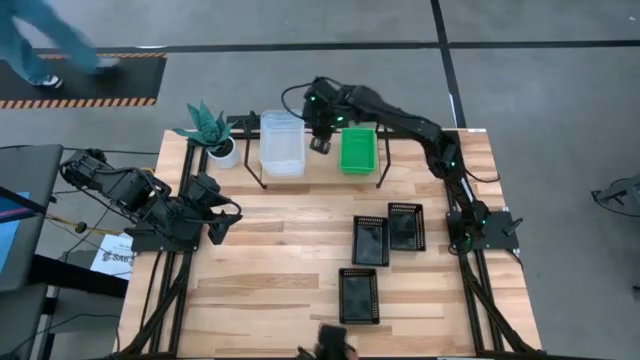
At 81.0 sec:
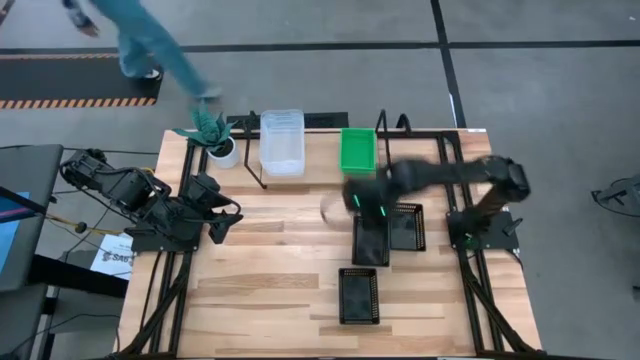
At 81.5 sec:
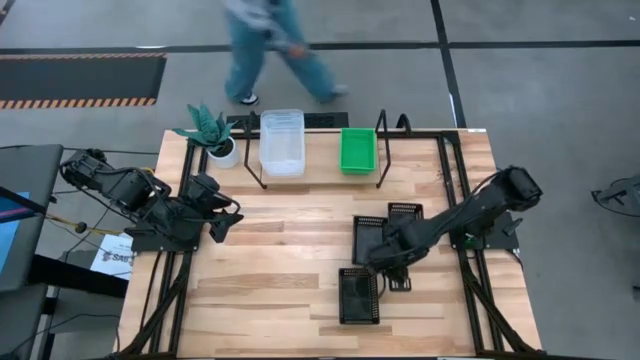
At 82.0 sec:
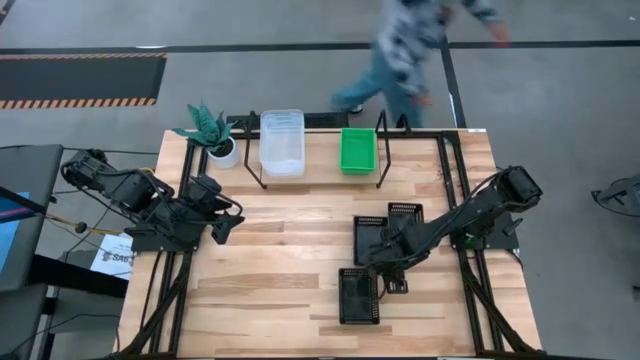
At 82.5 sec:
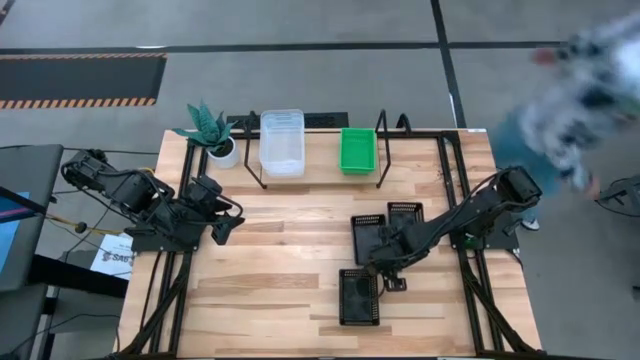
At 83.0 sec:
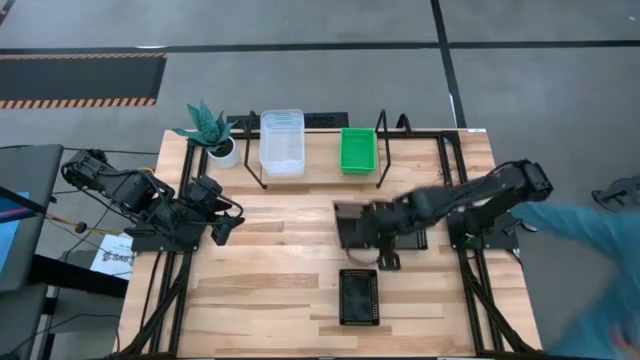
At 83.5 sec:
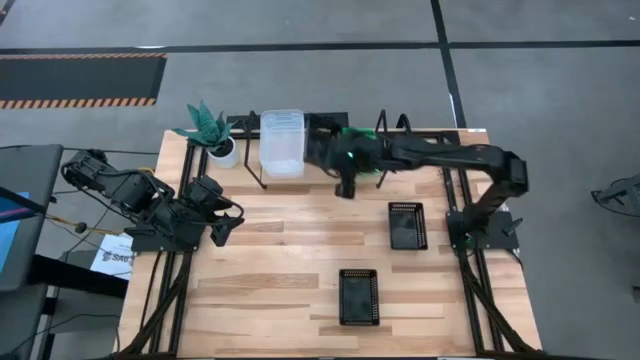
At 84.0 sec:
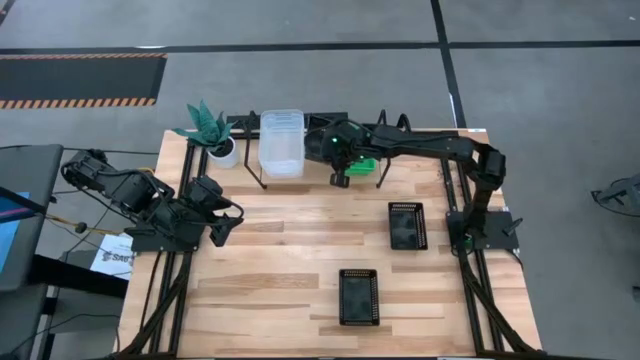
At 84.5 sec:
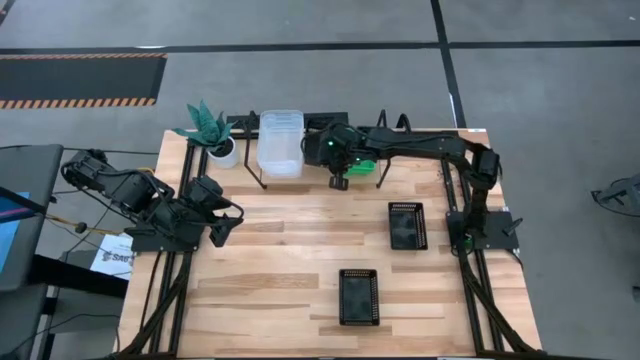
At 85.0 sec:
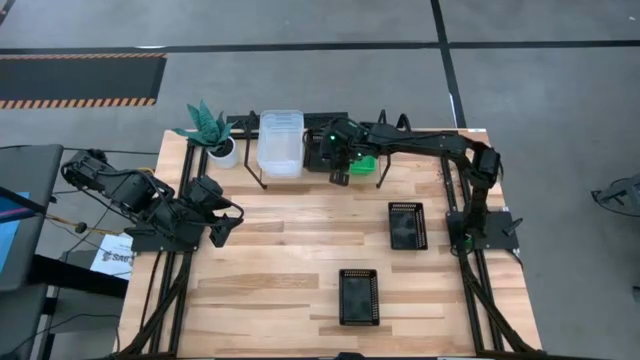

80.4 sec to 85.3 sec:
Task: Stack baskets on shelf by color
Put the top left black bin on the shelf

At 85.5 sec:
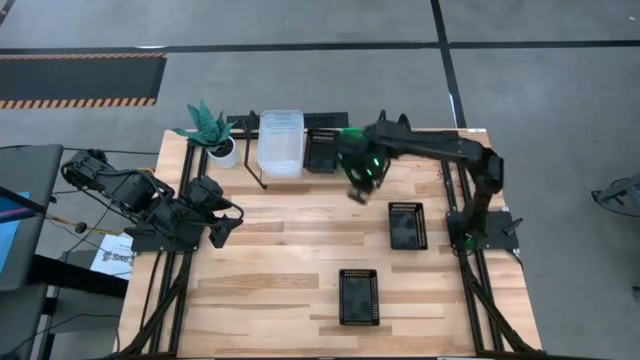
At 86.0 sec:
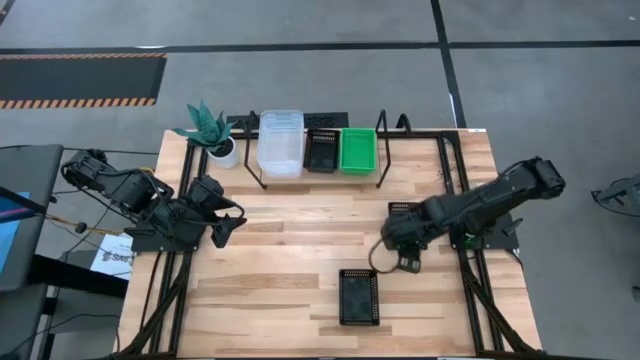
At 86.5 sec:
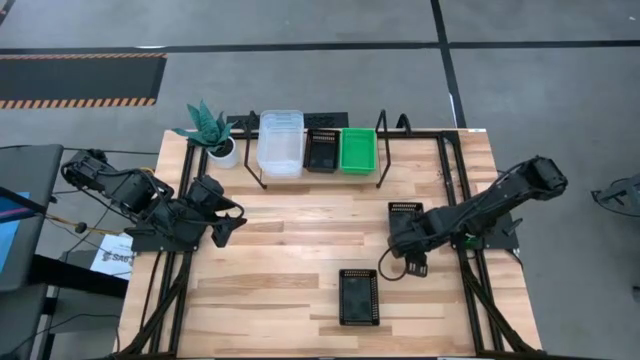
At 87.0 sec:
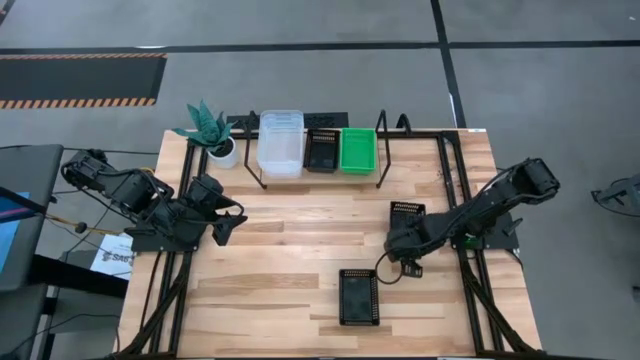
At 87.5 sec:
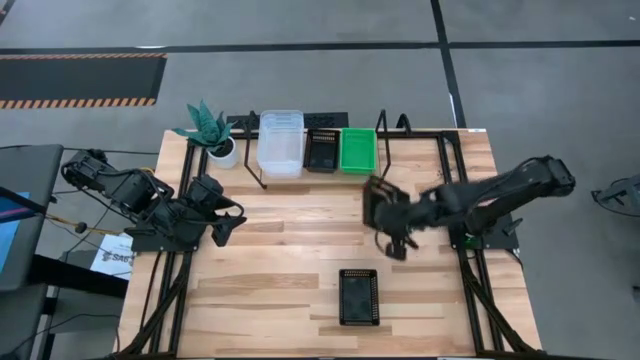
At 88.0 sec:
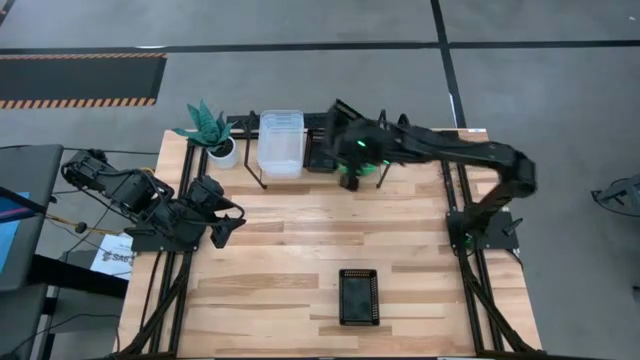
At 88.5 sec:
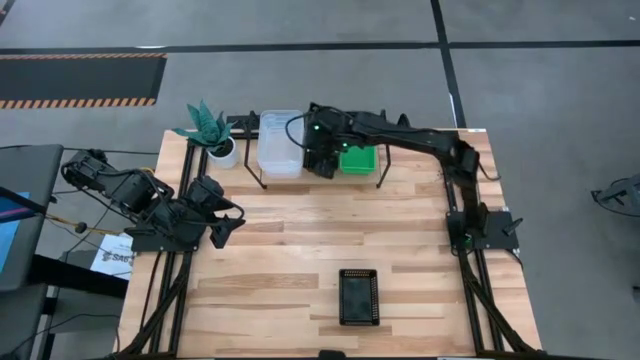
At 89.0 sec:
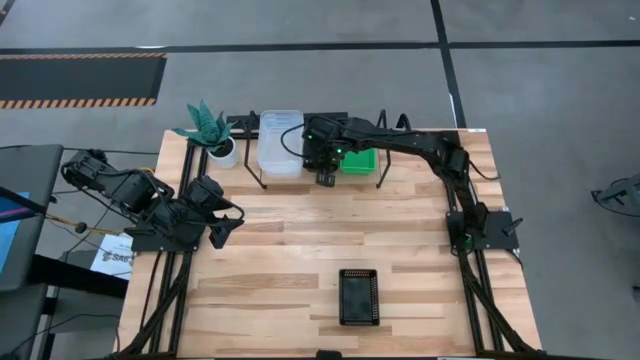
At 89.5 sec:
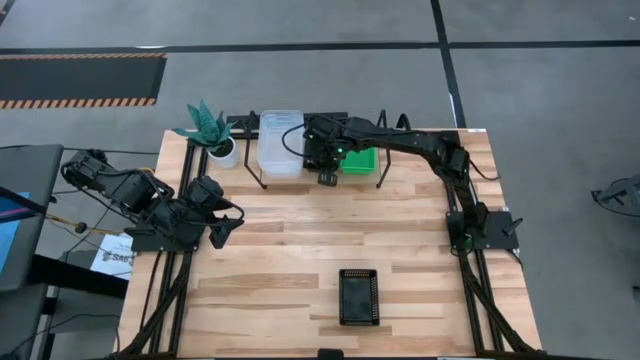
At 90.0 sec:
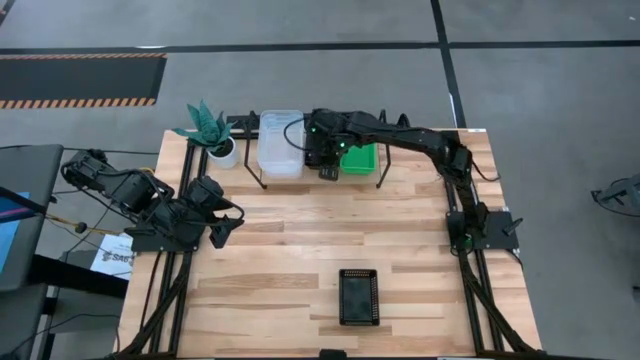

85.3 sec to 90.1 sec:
Stack the top black bin on top of the black bin on the shelf

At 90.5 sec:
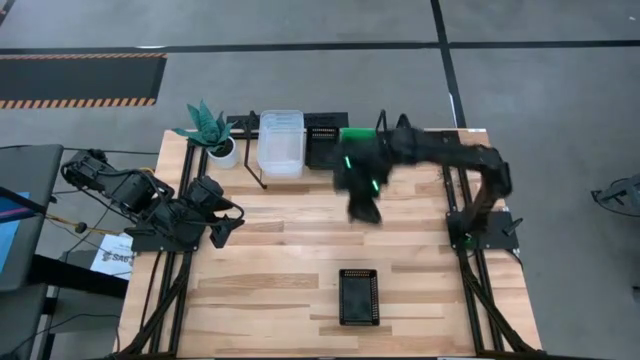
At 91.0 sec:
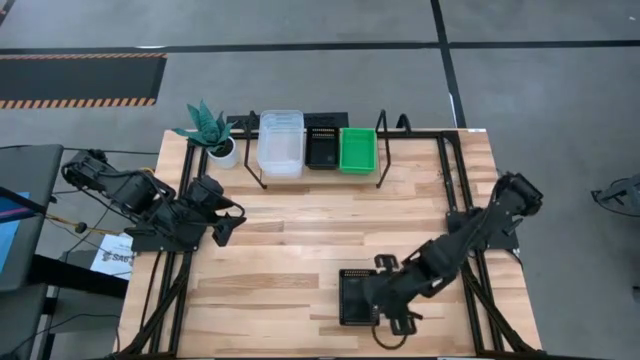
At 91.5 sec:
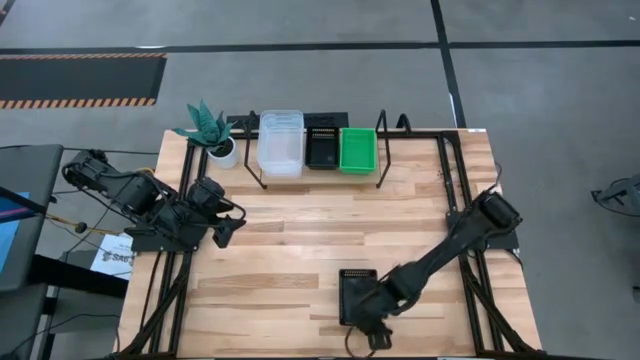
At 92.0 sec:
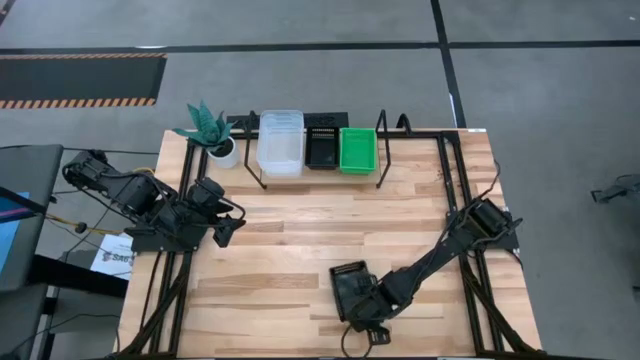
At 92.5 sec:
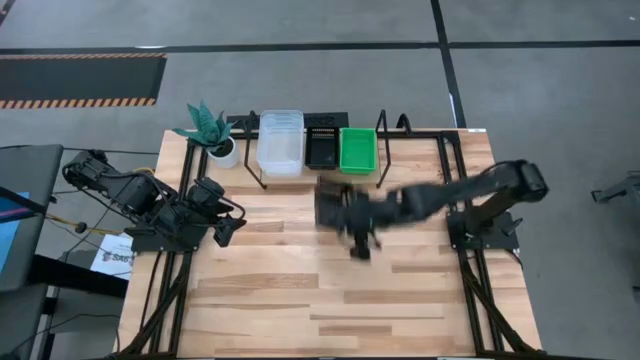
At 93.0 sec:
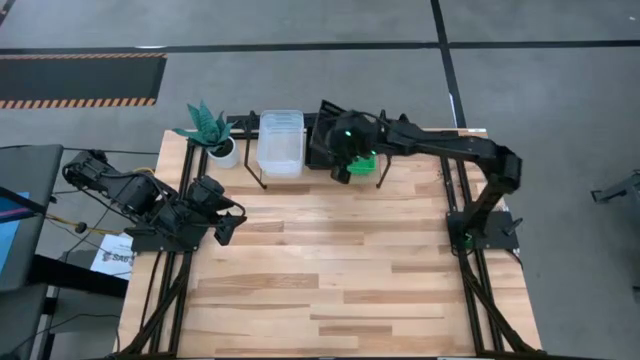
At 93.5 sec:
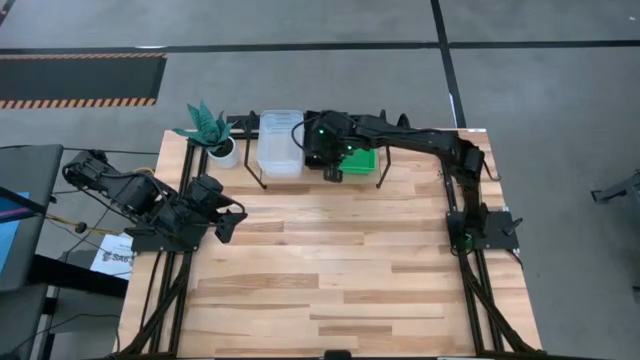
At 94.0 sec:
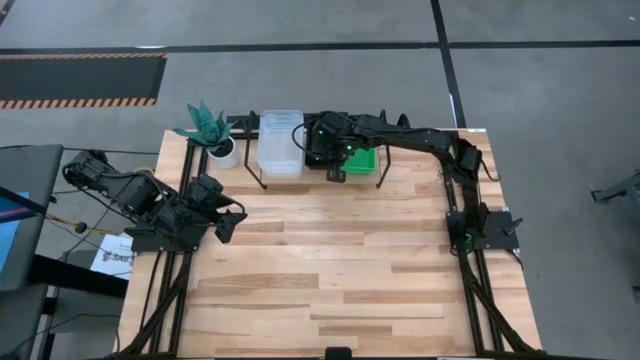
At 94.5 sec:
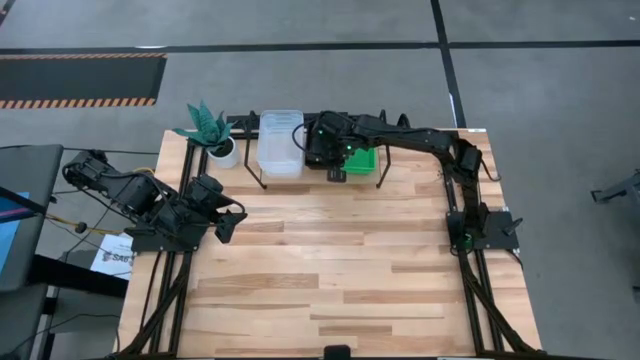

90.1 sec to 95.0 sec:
Stack the black bin on top of the stacked black bins on the shelf

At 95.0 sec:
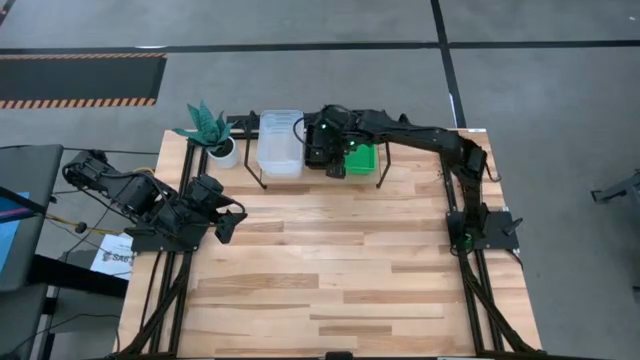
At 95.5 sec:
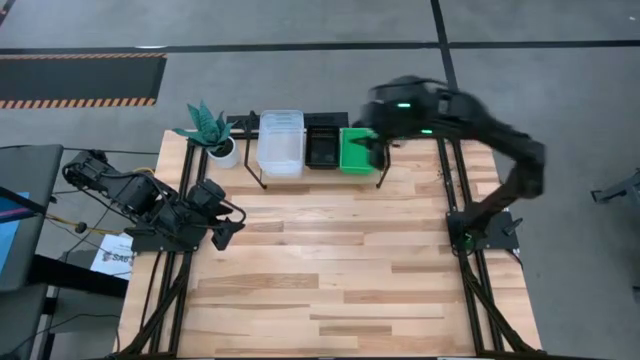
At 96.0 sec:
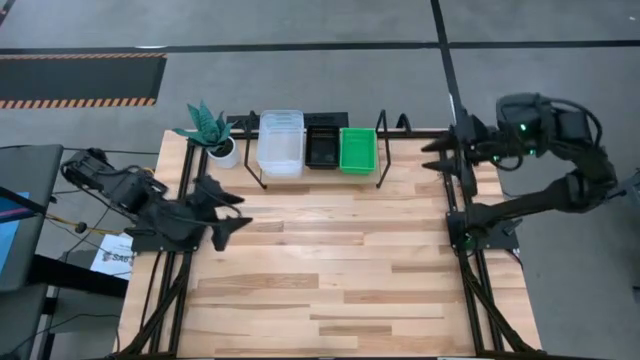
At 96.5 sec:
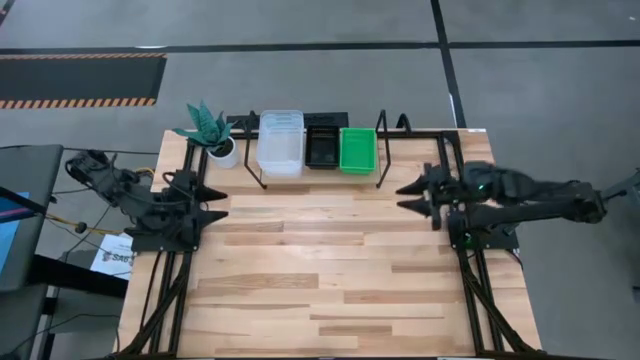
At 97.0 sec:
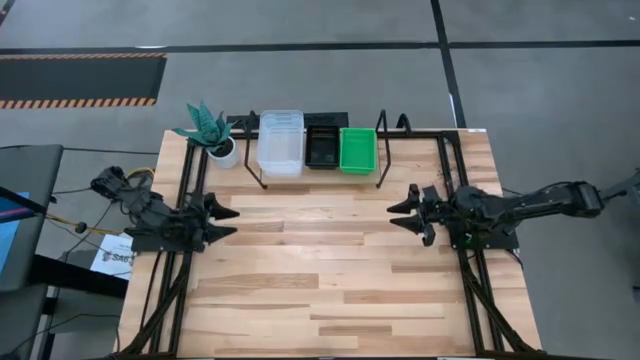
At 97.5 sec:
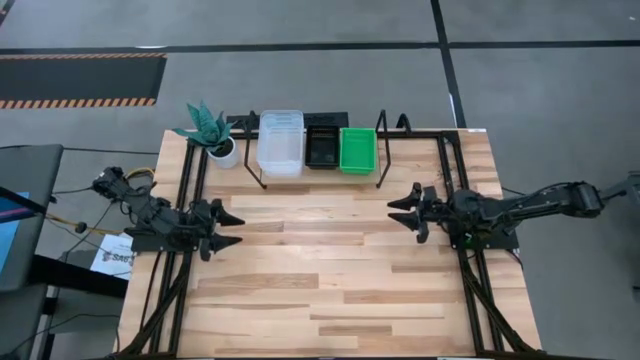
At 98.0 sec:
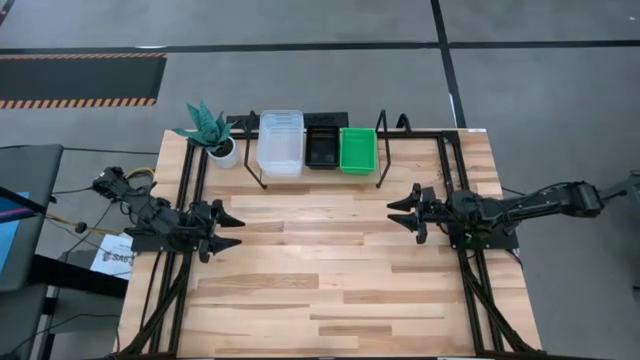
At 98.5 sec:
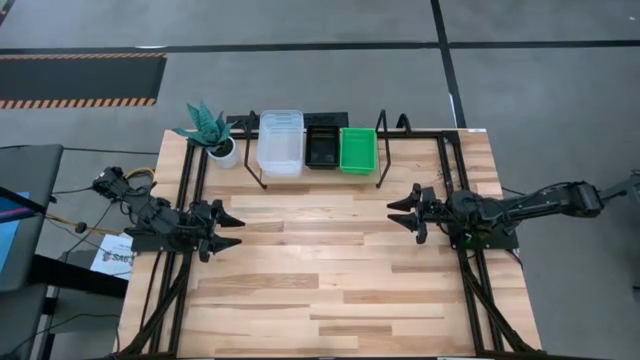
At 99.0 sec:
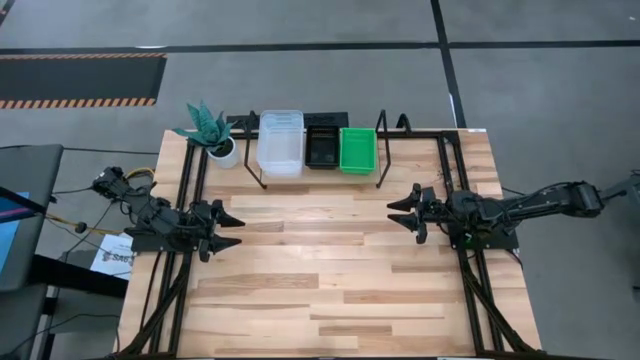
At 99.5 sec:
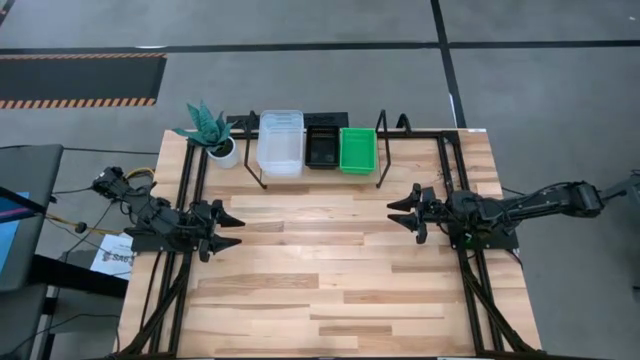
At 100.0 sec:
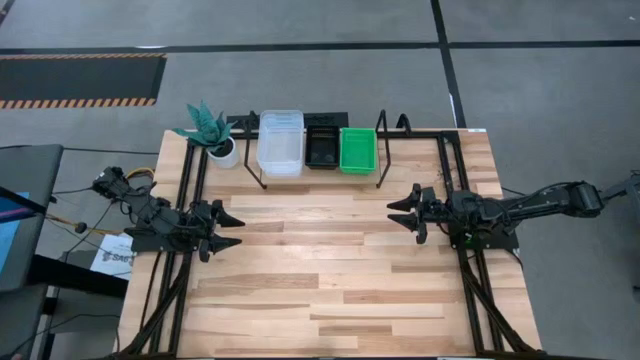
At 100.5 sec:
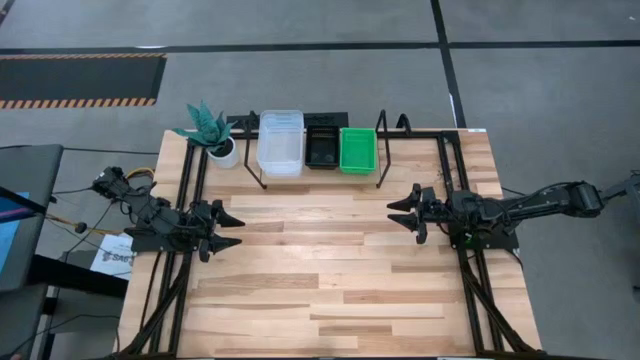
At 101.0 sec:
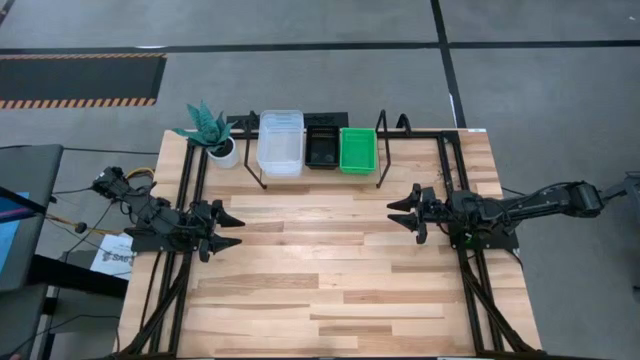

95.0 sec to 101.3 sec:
Return to Home Position
